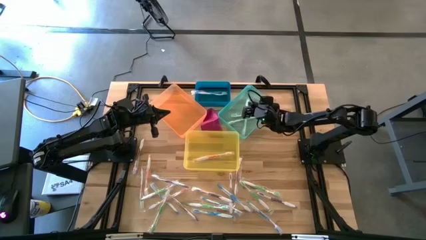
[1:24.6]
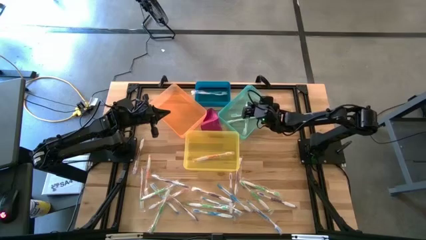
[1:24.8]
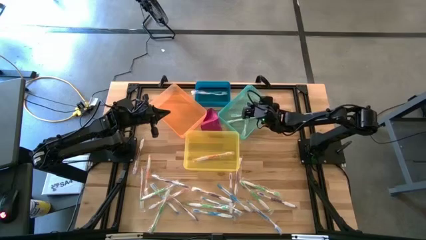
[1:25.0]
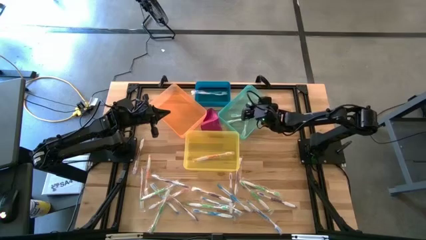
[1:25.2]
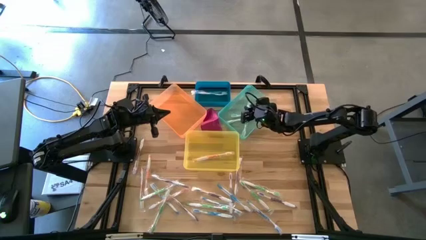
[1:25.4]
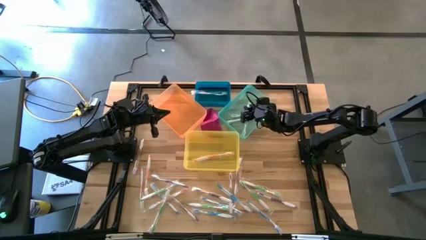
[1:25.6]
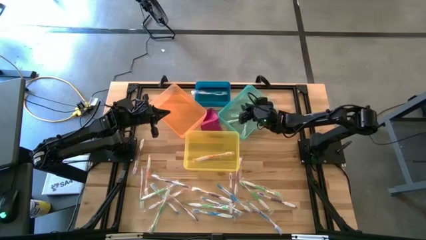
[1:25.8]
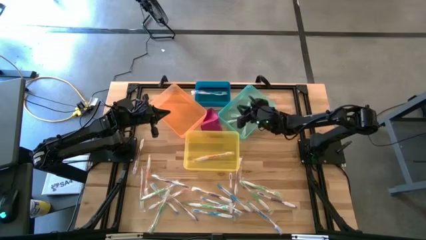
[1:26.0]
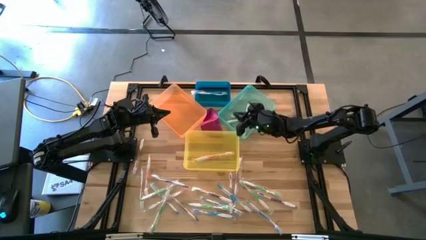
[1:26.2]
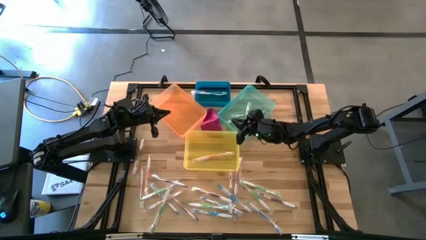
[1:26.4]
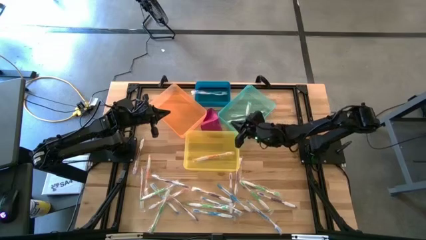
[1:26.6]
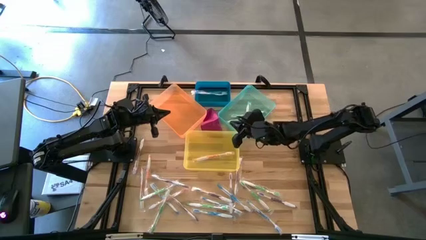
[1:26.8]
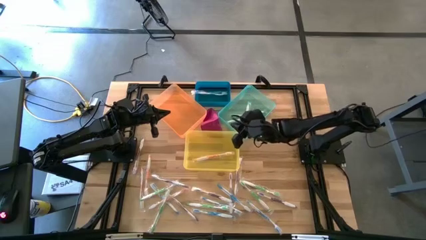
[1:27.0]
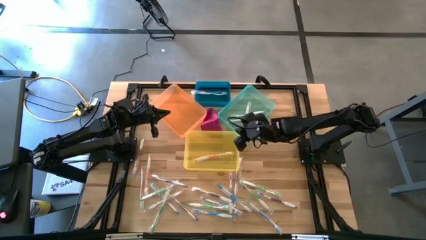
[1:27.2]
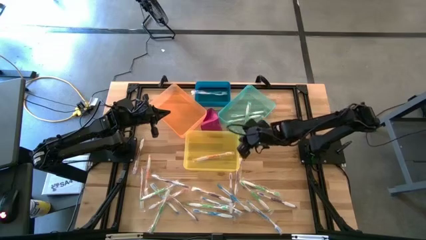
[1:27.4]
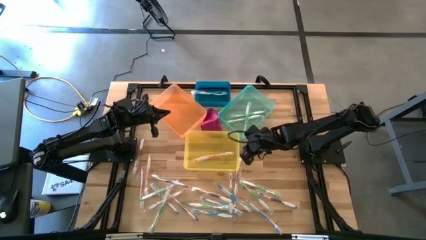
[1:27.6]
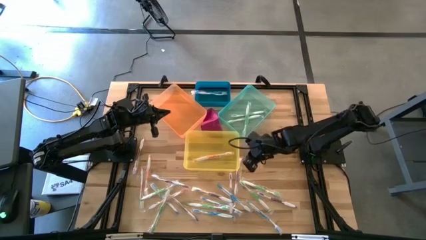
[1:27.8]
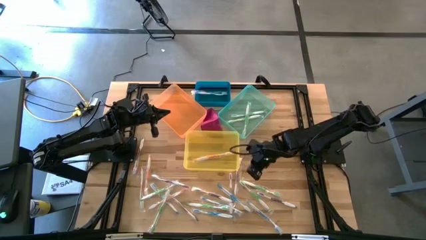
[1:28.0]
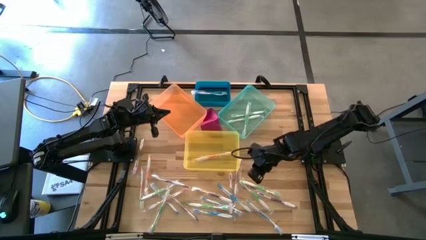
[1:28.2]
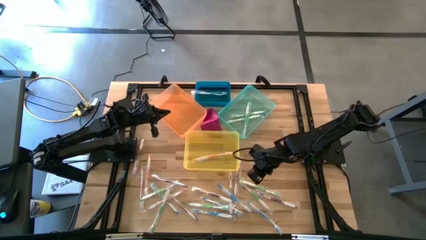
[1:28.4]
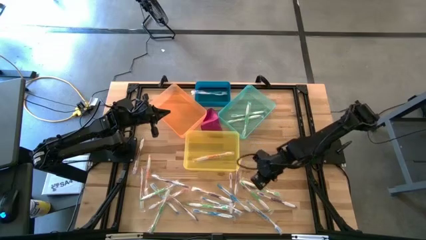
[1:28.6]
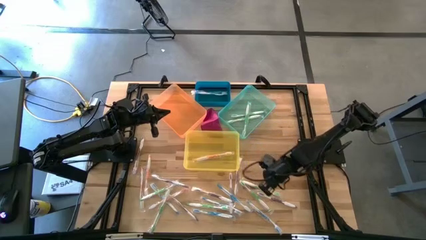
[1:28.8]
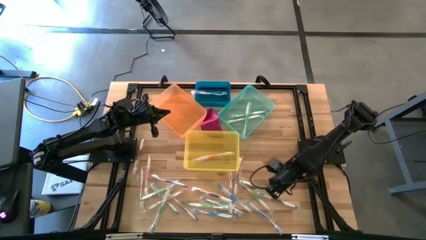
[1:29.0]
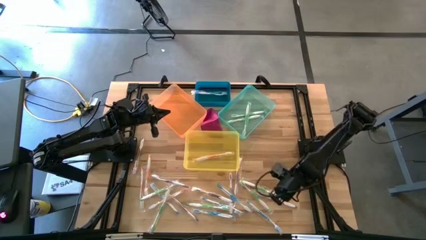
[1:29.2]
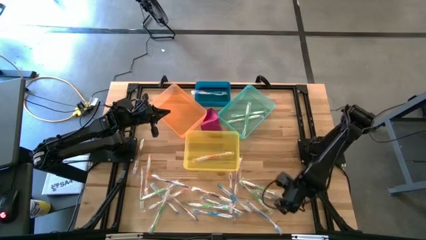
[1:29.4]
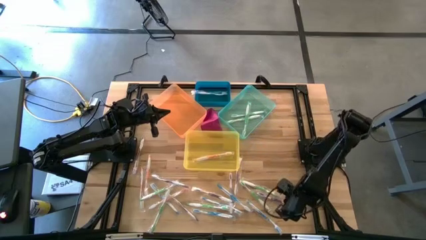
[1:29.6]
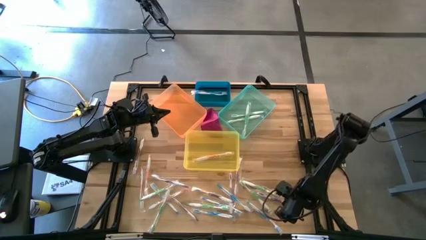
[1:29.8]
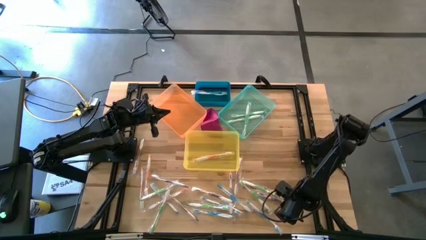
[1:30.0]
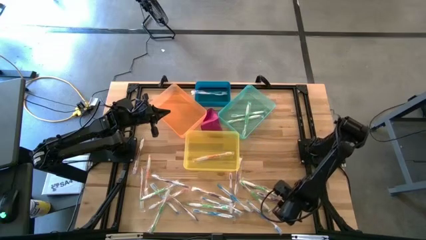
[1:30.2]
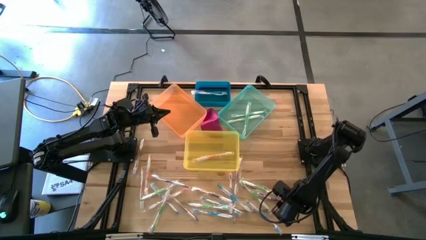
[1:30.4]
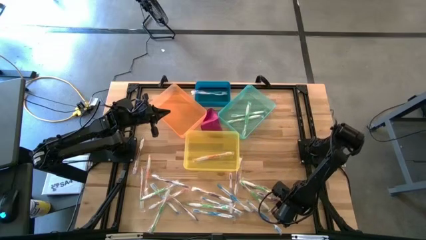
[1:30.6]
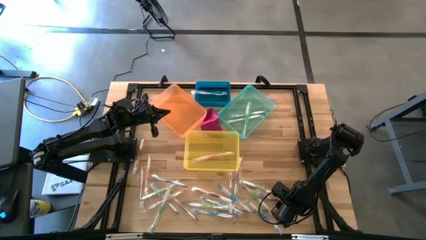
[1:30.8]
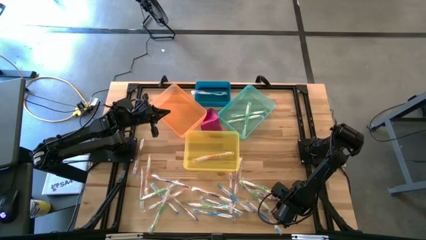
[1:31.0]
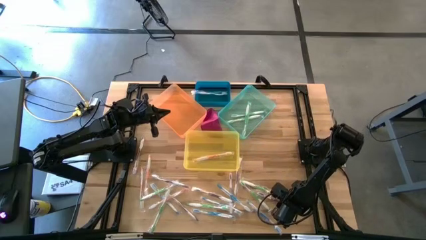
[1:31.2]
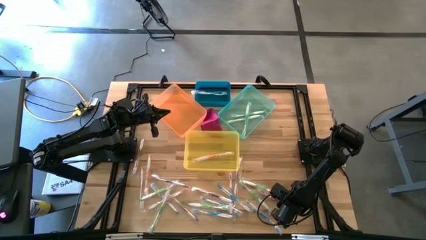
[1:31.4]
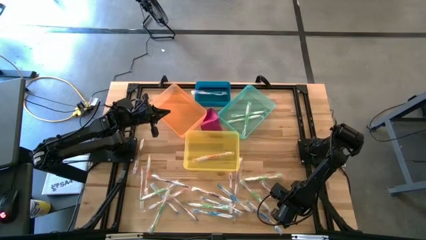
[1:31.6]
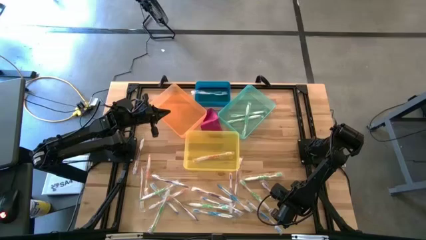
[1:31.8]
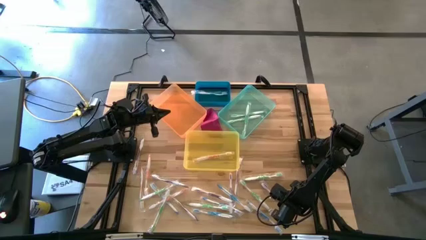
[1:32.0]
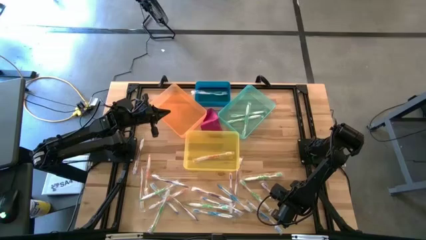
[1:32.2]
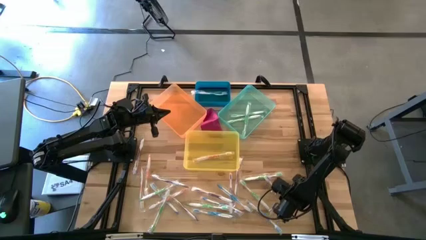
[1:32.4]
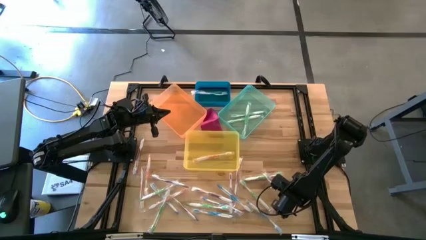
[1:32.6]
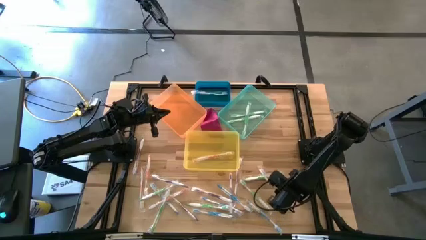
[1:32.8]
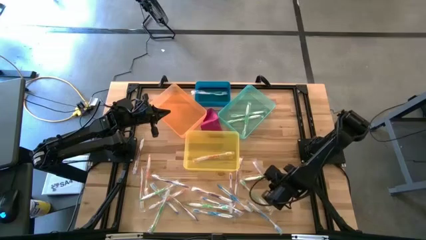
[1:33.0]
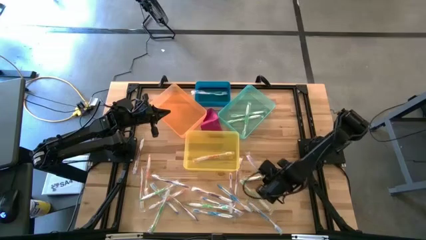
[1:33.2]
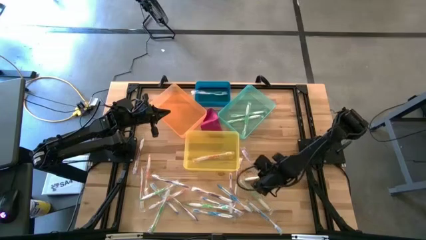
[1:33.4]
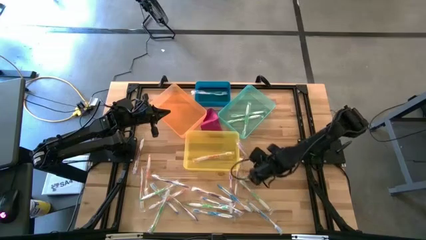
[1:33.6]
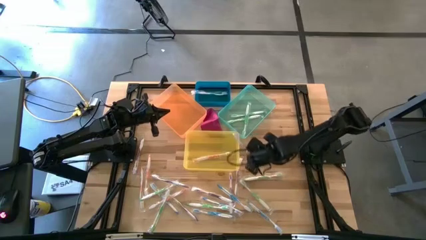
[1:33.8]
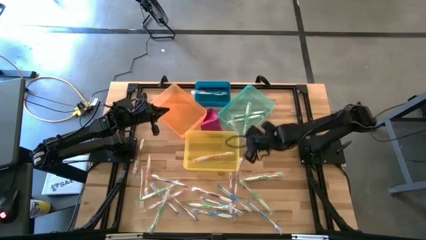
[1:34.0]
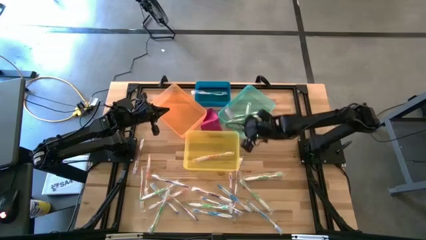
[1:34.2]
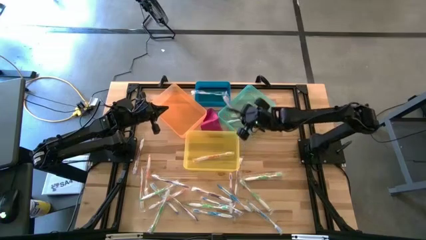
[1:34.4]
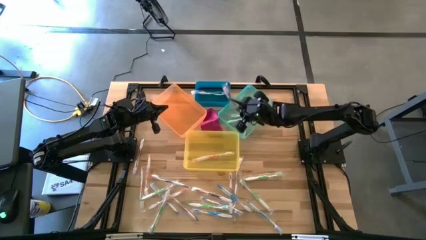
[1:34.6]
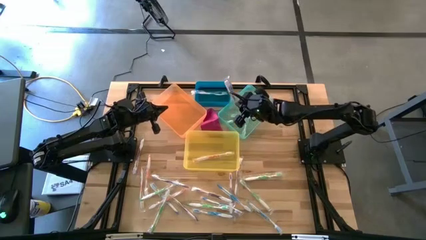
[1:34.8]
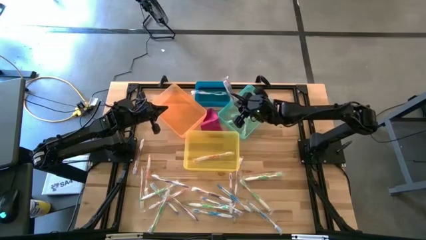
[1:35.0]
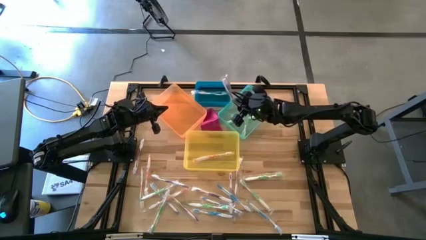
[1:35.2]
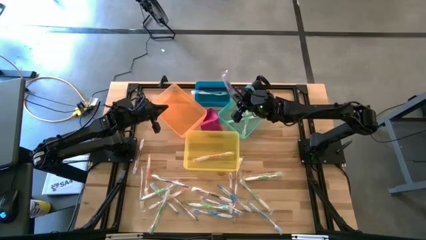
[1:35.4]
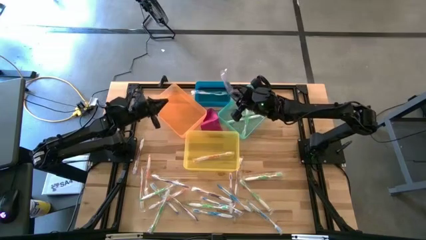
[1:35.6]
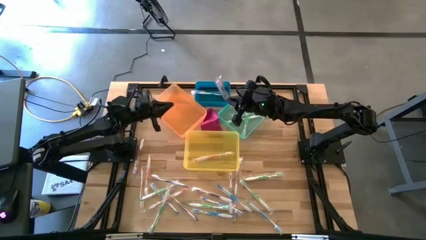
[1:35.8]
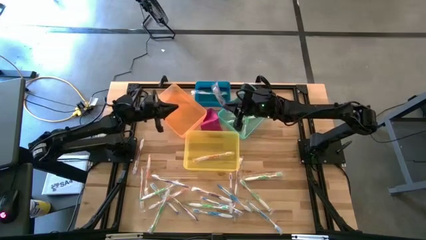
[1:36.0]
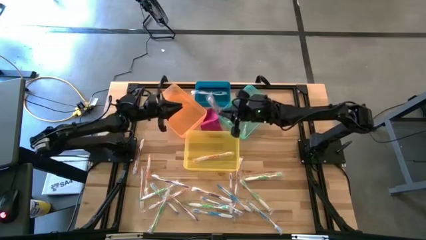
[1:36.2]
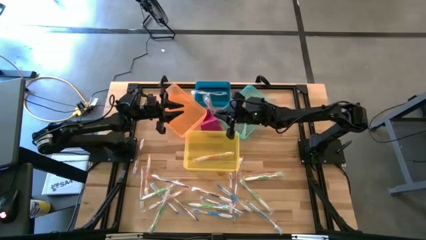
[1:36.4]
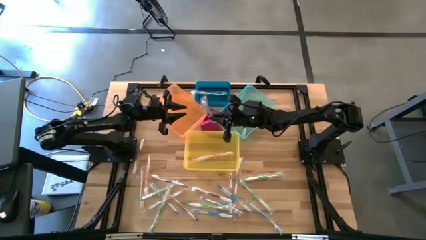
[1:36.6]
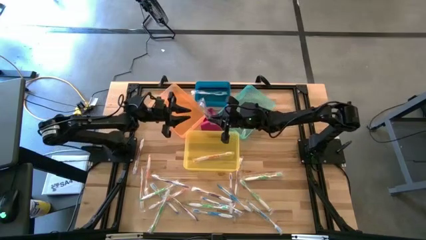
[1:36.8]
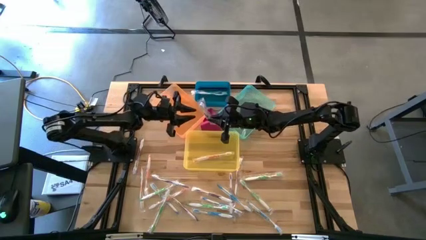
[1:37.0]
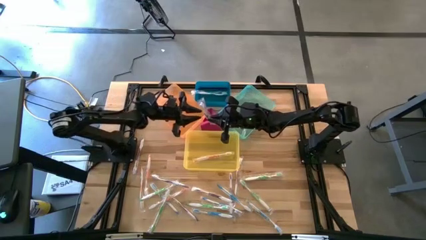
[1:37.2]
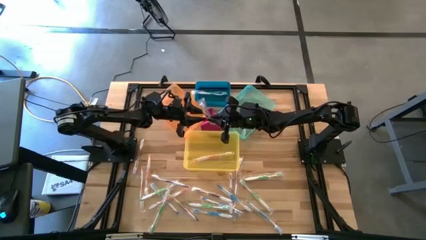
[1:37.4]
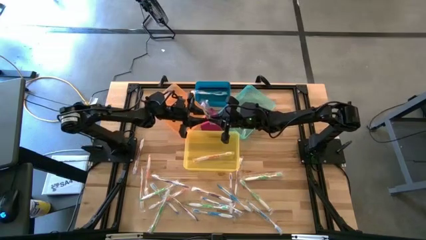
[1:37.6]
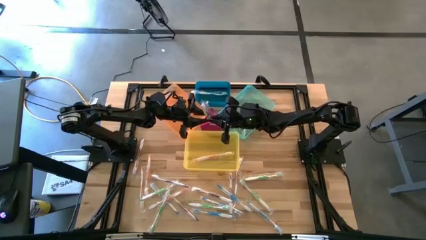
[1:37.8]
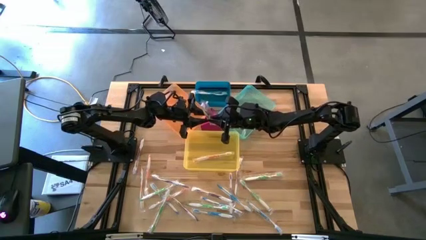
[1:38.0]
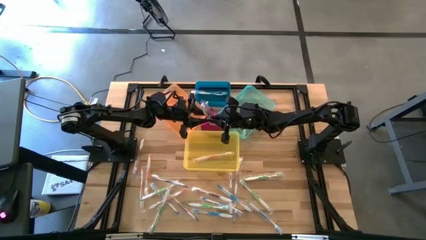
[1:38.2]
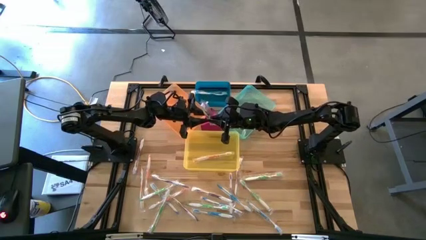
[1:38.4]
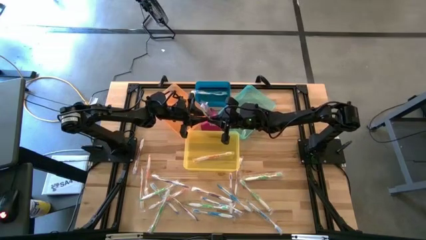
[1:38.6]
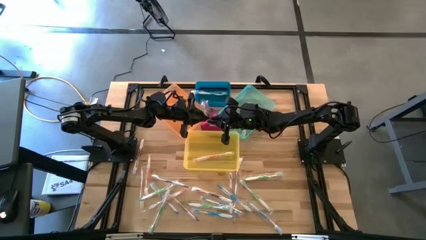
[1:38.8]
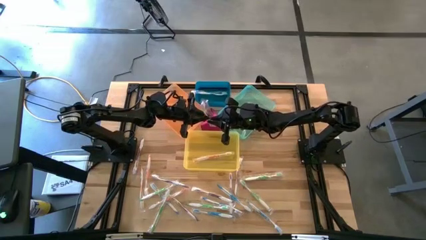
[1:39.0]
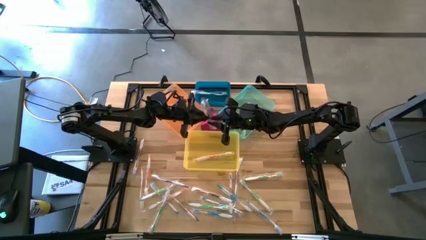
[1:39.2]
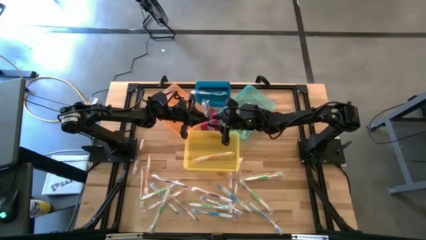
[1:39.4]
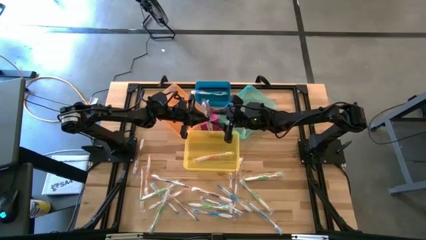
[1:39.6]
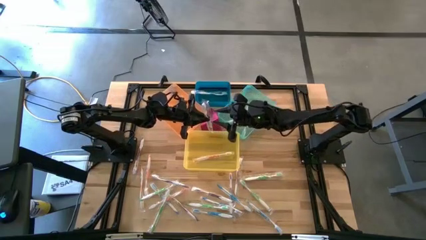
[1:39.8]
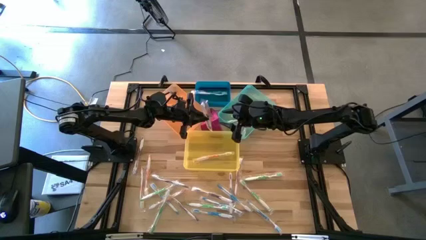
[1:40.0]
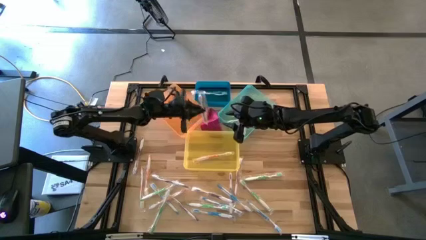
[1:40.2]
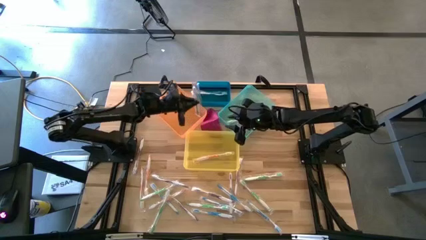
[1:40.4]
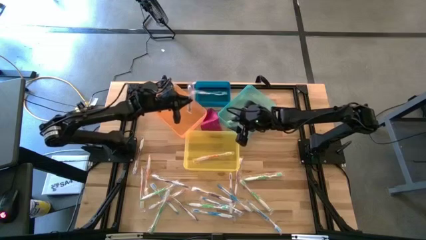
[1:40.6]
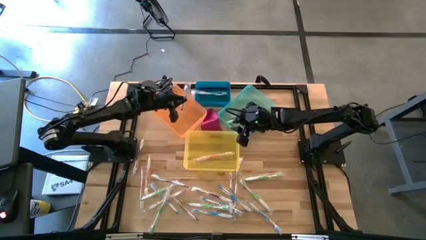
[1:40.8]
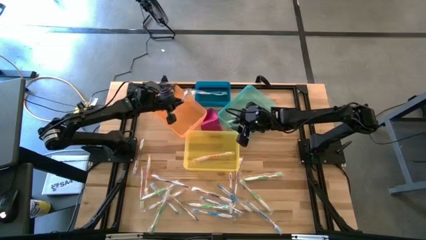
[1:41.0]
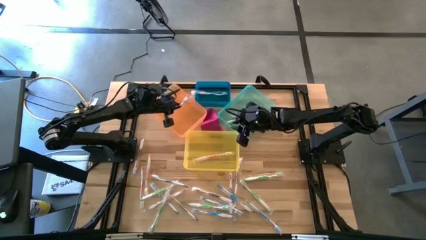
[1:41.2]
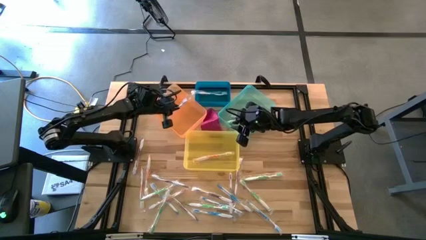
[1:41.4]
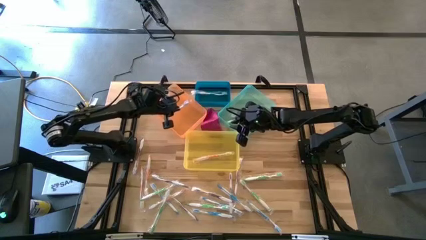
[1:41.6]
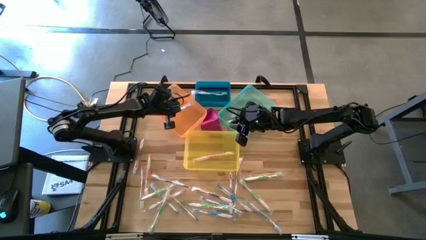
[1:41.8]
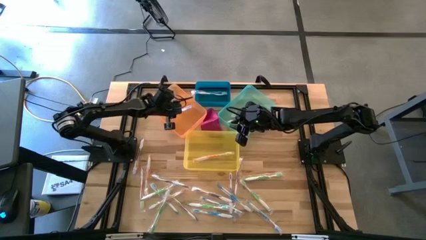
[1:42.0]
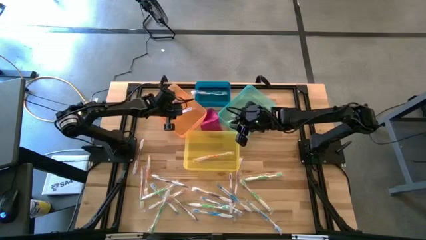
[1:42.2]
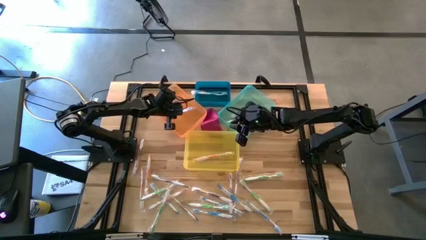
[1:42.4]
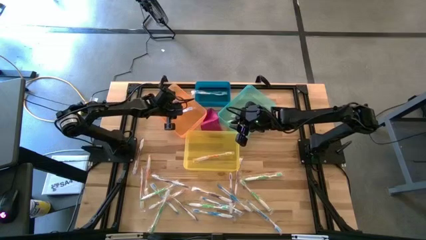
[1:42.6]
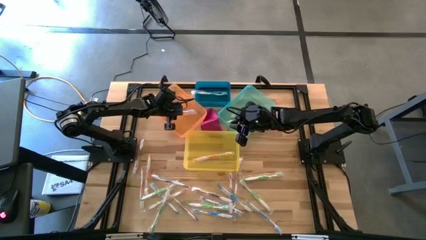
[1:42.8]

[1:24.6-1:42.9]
Task: Pick & Place Toothbrushes
Put the purple toothbrush into the orange bin
